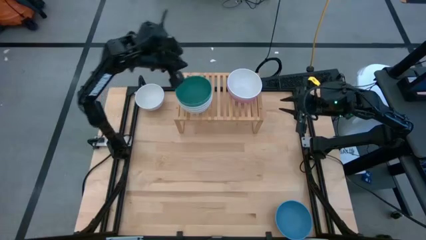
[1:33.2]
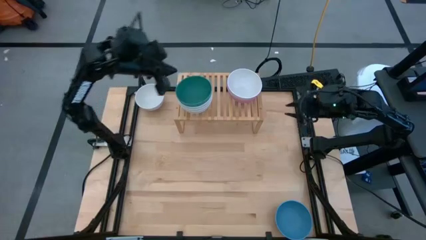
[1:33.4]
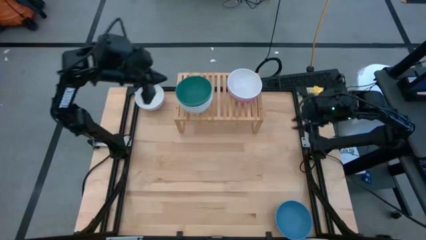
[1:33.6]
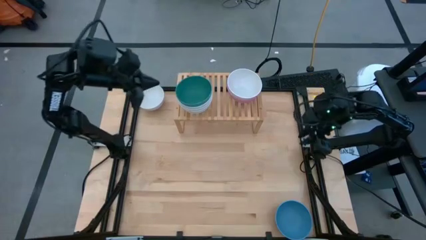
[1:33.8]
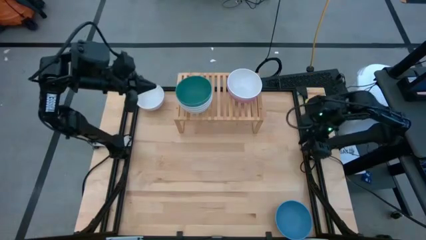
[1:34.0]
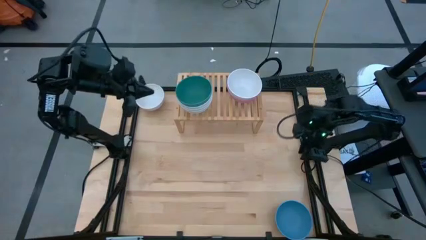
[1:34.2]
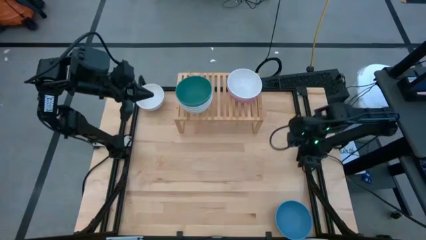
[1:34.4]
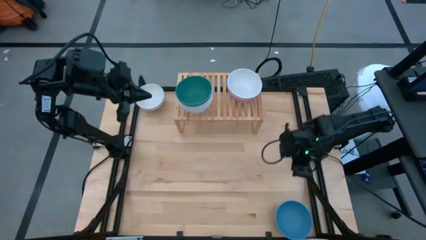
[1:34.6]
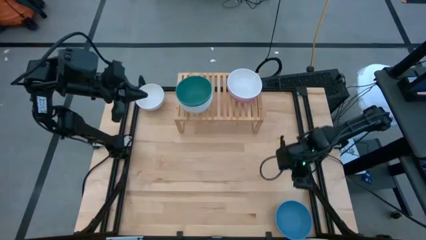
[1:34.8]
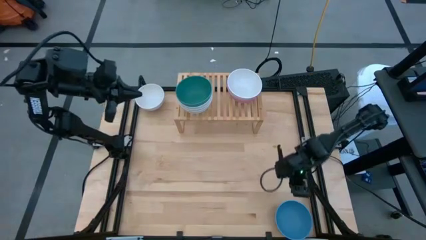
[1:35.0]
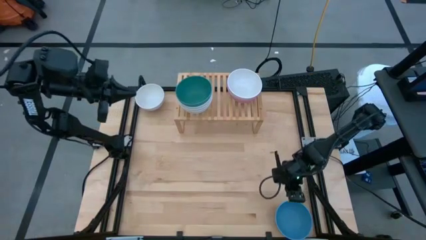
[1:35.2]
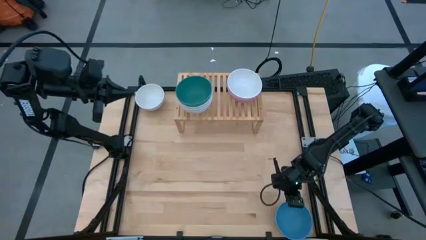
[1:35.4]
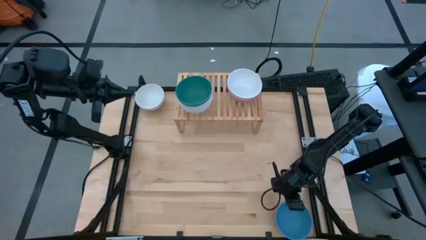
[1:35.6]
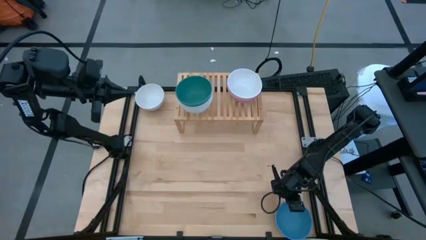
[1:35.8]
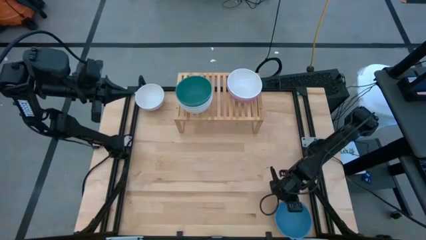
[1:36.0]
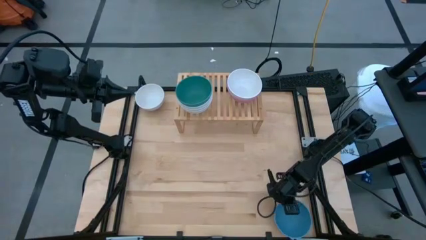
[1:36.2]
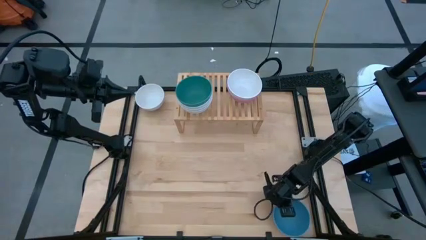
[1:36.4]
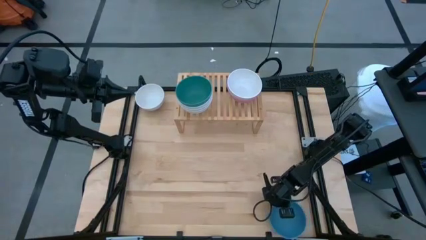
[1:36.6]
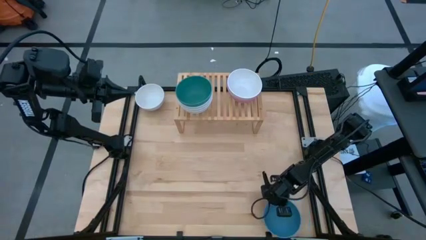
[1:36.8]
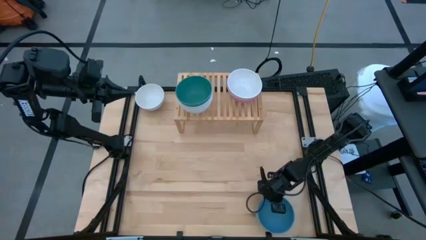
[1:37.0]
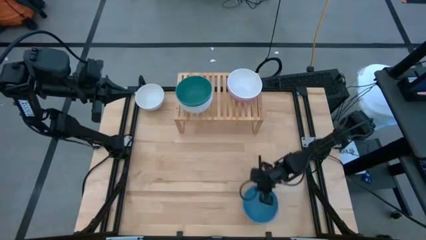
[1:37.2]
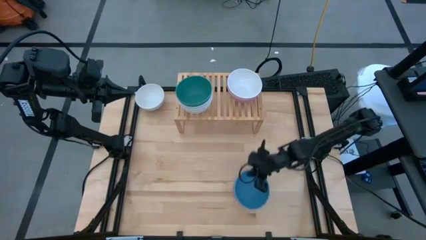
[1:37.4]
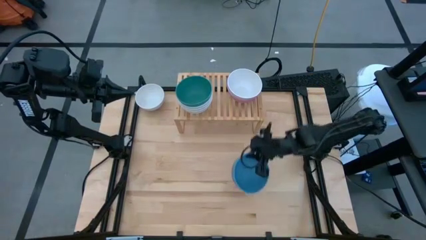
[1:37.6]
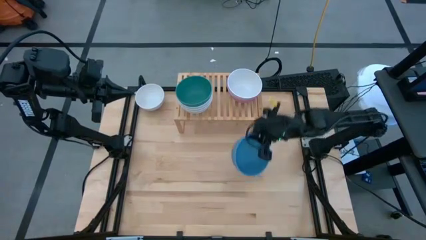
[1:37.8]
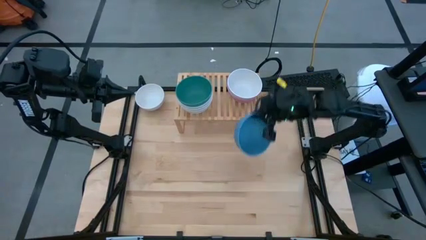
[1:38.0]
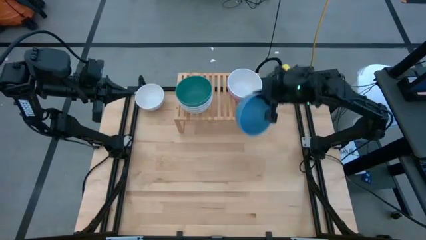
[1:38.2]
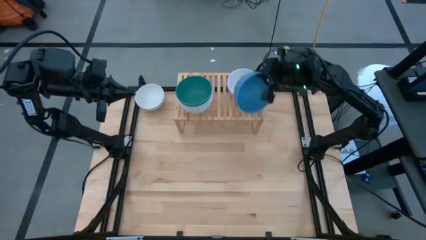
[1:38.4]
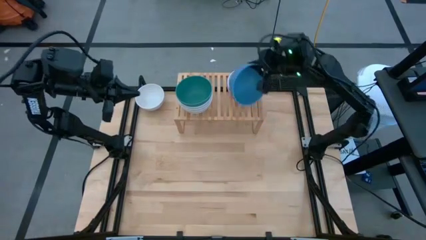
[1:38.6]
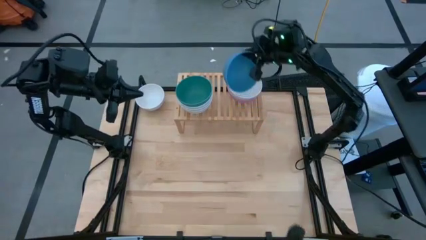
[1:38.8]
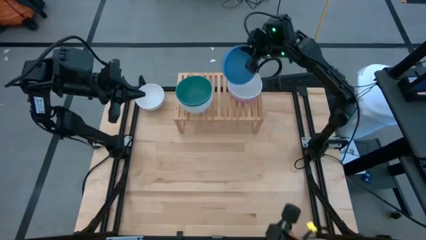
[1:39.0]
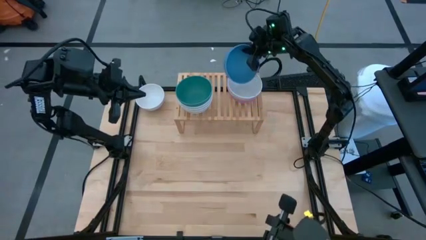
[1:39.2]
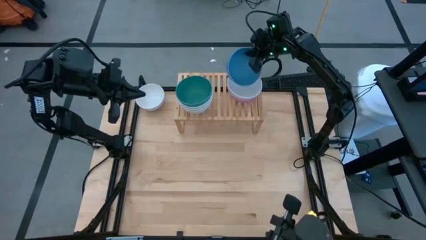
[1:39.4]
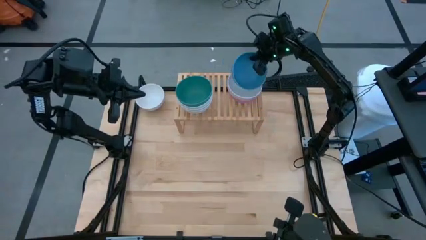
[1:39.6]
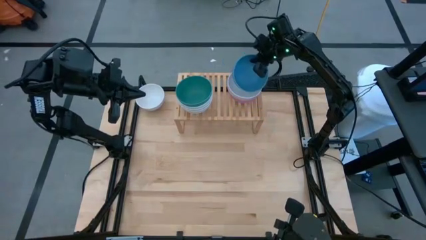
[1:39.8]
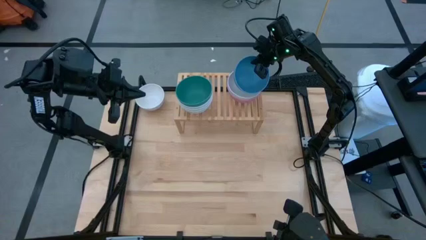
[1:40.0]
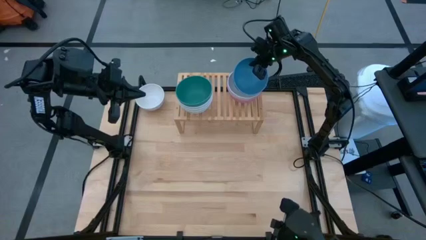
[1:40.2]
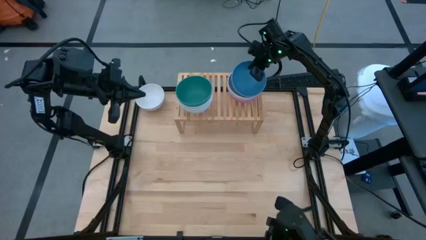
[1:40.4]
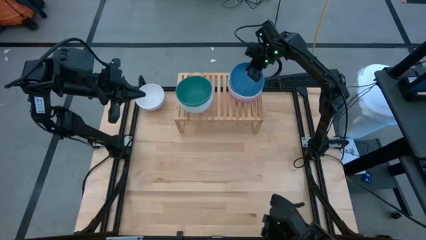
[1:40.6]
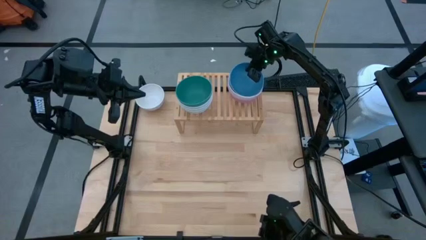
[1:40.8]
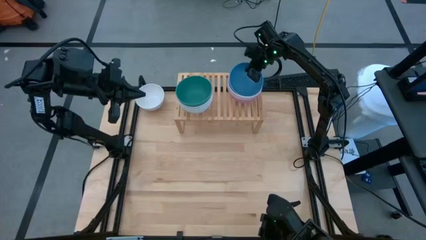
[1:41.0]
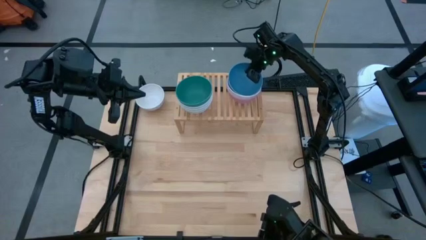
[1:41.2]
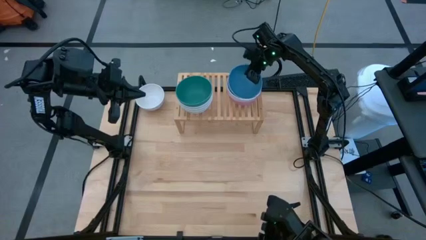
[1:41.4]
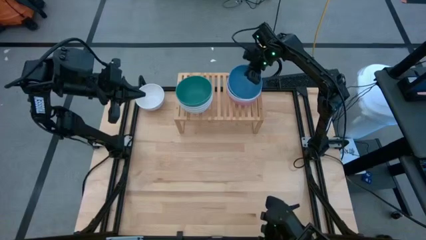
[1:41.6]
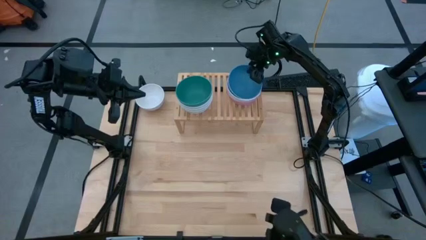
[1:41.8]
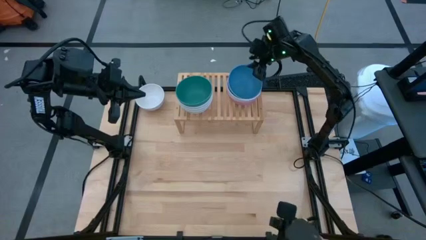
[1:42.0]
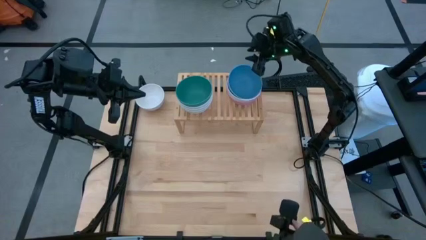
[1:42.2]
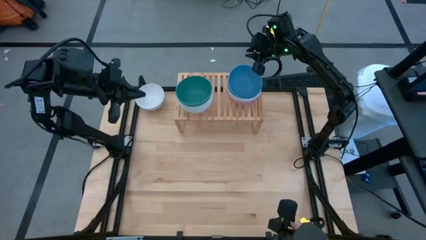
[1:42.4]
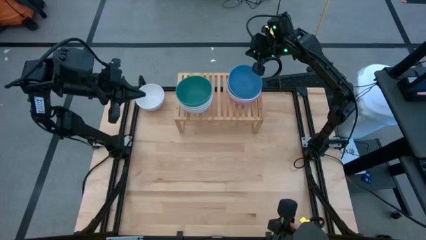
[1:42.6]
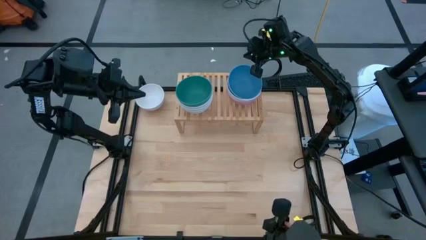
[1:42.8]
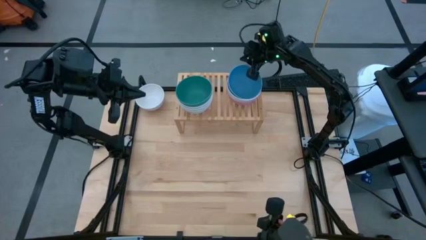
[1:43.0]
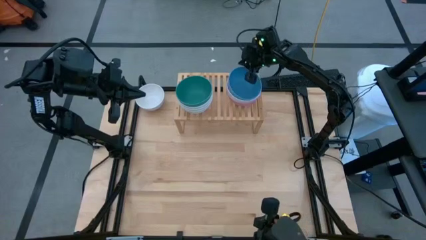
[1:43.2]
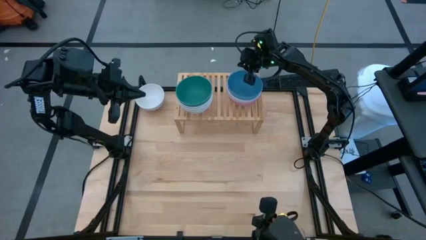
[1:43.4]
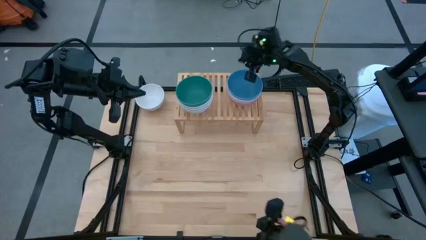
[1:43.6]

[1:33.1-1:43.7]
Task: Place and stack bowls onto a shelf
Stack the blue bowl on top of the white bowl on the shelf

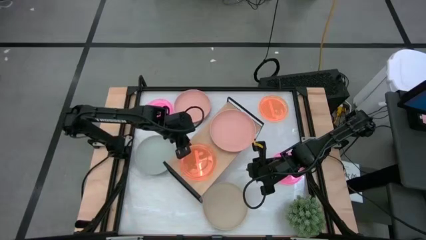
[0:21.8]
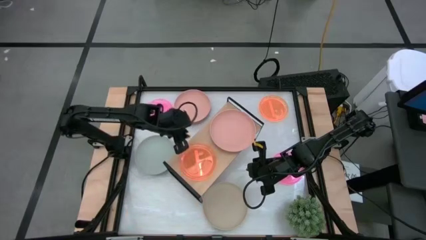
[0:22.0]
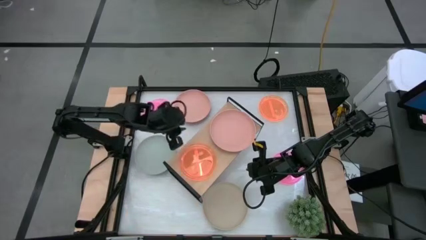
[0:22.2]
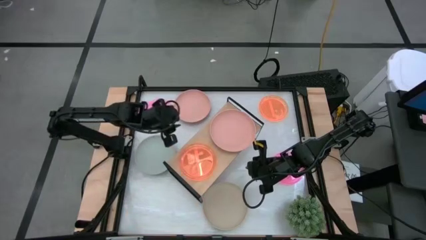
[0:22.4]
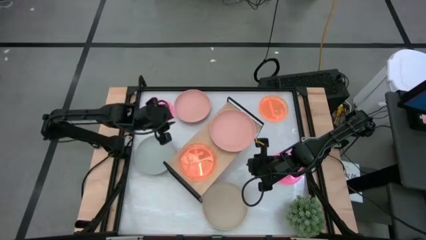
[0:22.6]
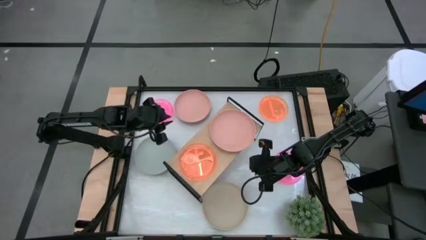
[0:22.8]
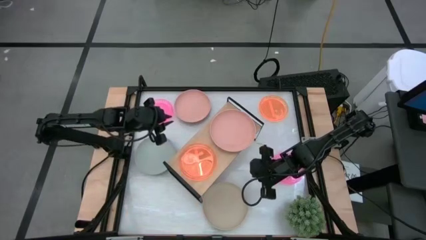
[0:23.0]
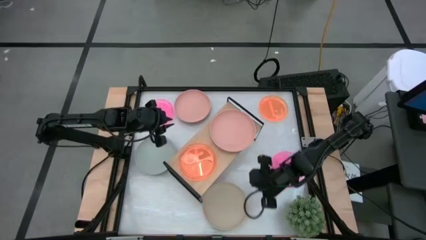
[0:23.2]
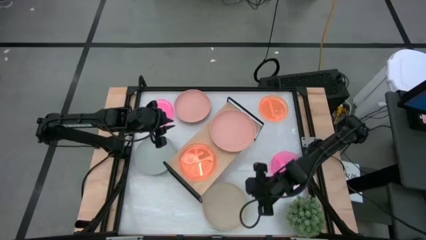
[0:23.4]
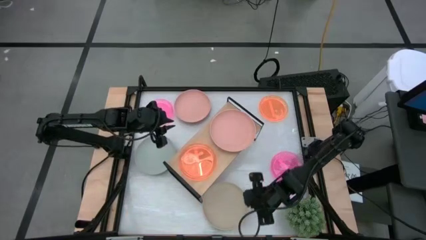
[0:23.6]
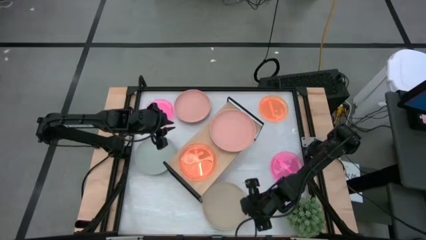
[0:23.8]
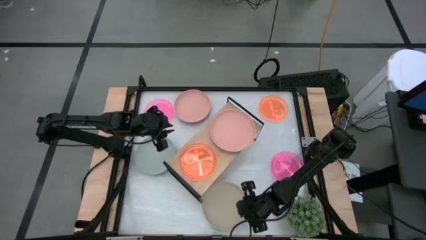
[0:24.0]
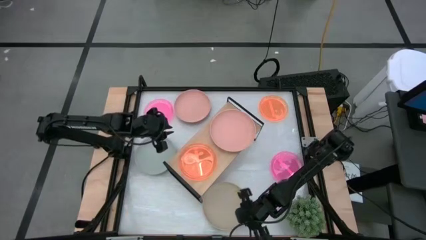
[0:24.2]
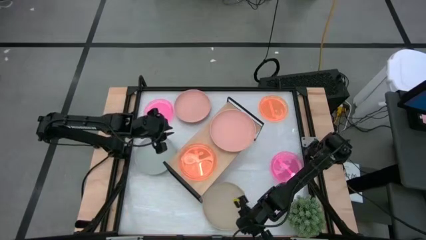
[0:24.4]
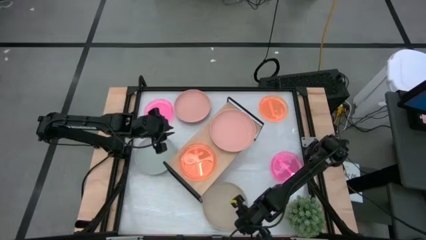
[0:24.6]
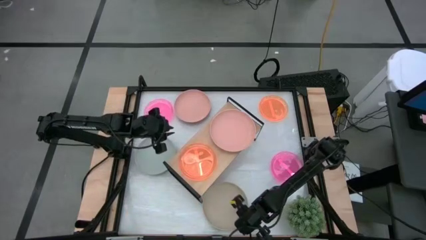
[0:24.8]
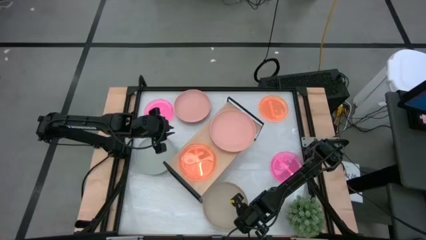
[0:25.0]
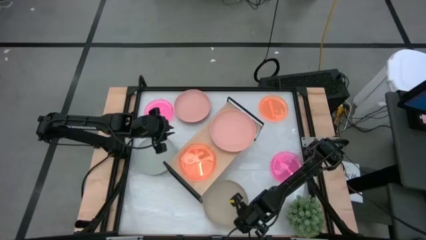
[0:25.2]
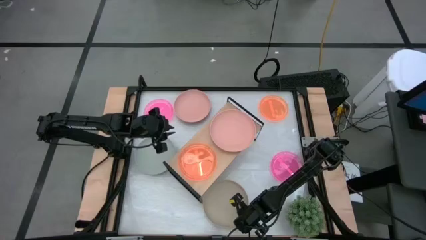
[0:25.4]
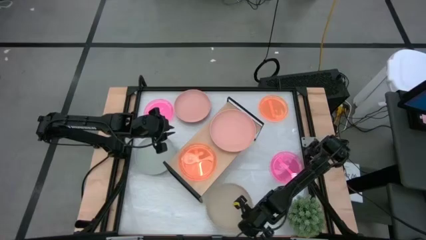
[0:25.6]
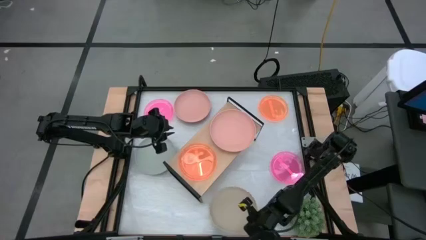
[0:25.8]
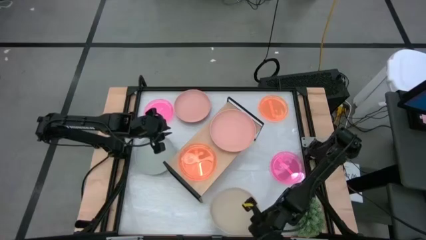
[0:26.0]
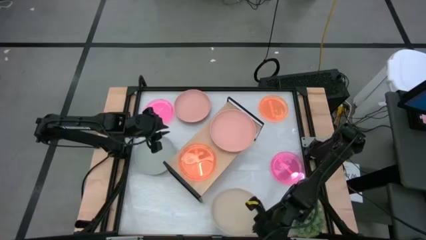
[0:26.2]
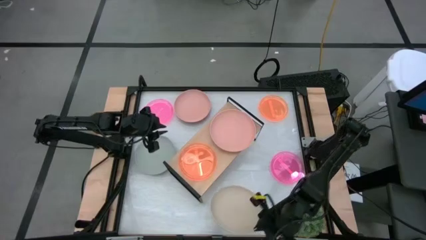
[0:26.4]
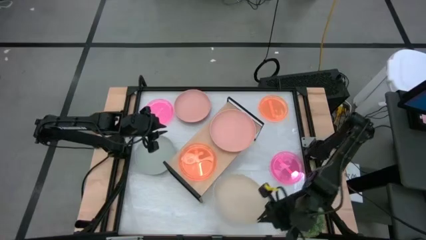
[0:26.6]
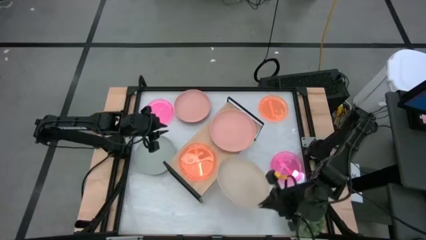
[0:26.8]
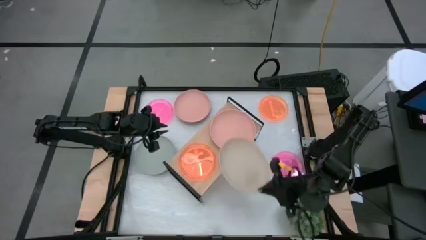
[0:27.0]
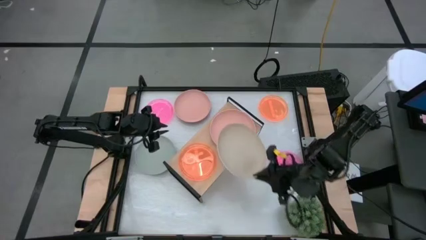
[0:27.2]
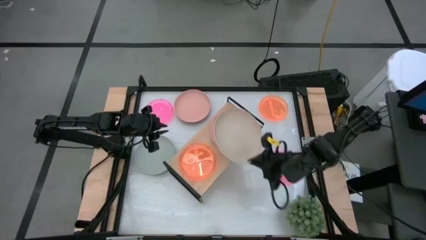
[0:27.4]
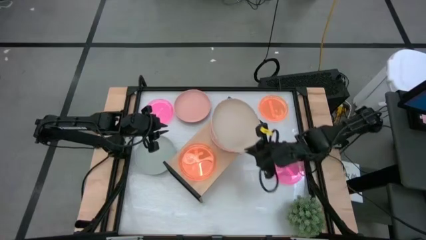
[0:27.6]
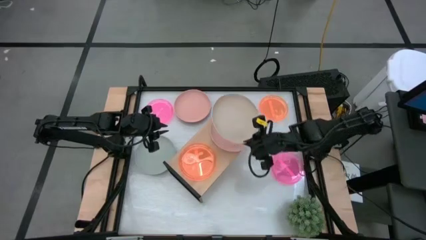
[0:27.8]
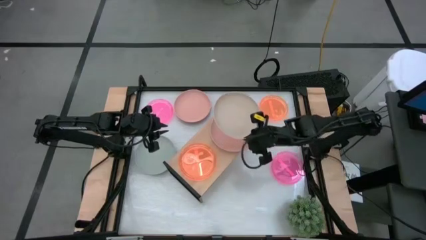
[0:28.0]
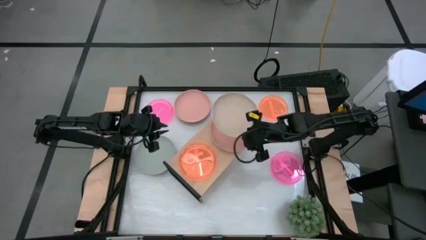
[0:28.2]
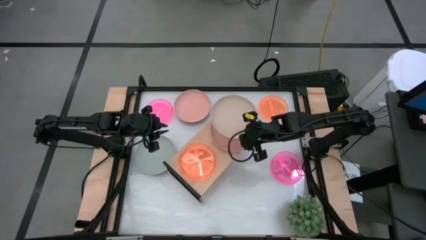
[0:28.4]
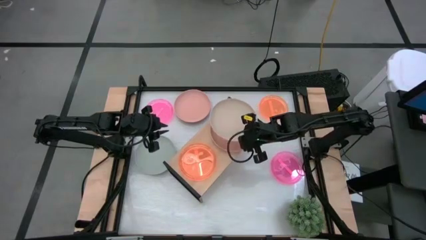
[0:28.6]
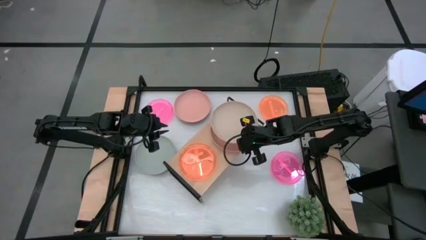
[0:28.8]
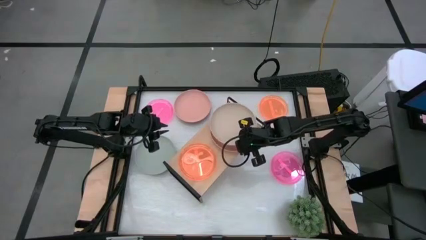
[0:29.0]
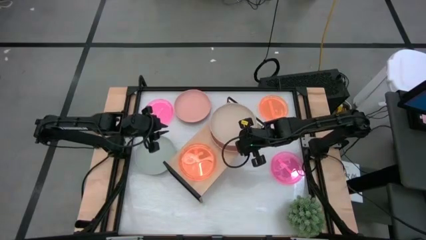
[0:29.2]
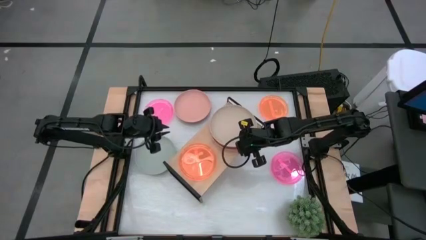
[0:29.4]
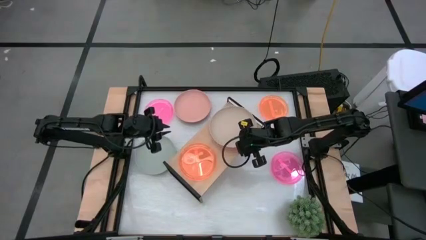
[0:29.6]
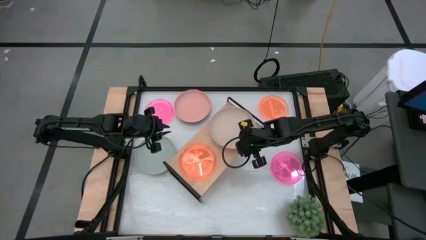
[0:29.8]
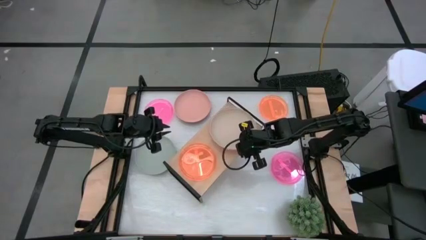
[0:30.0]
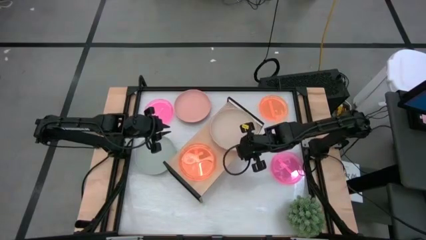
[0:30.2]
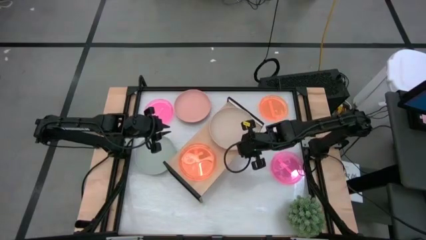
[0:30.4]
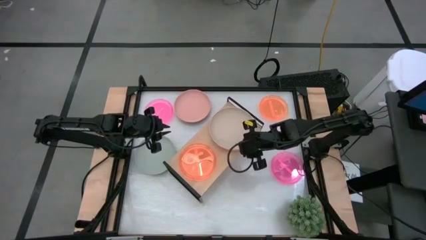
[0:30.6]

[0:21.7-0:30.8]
Task: Place and stack plates onto a shelf
Stack the brown plate on top of the big light pink plate on the shelf
